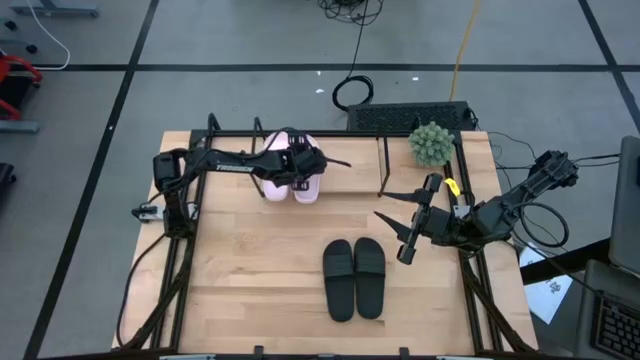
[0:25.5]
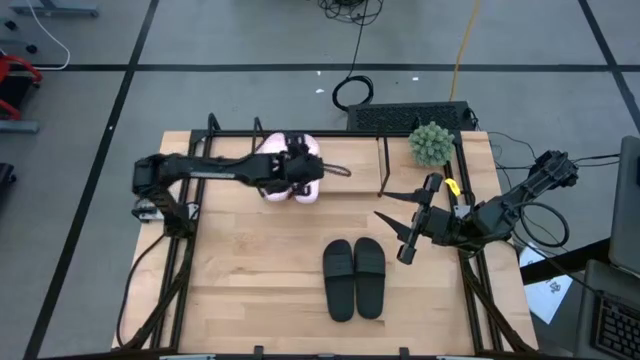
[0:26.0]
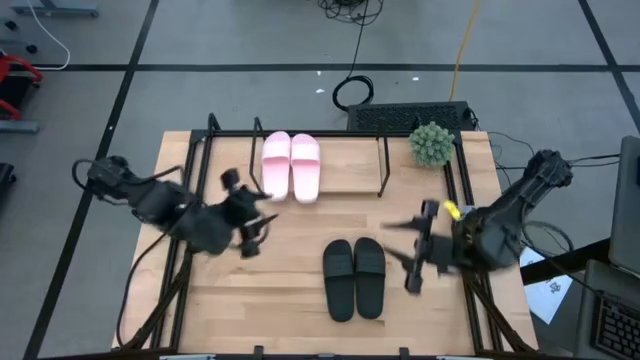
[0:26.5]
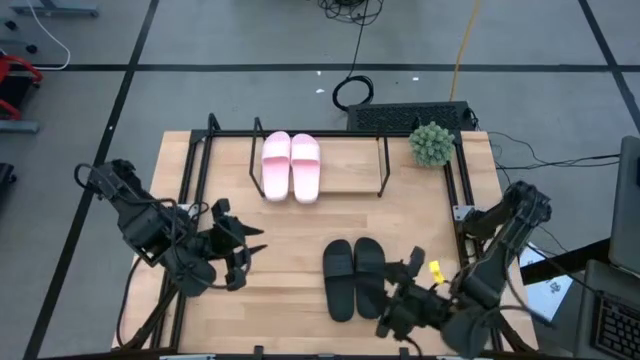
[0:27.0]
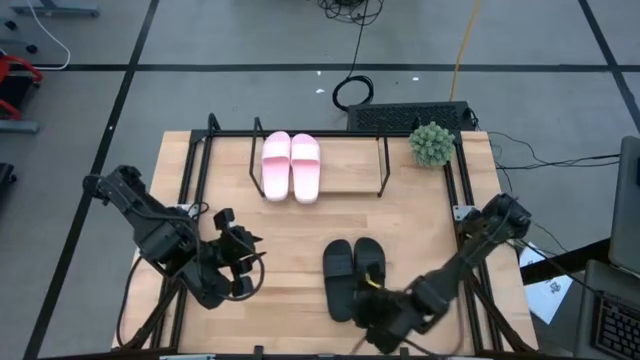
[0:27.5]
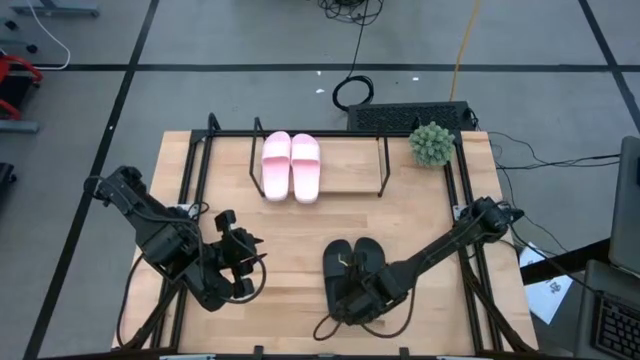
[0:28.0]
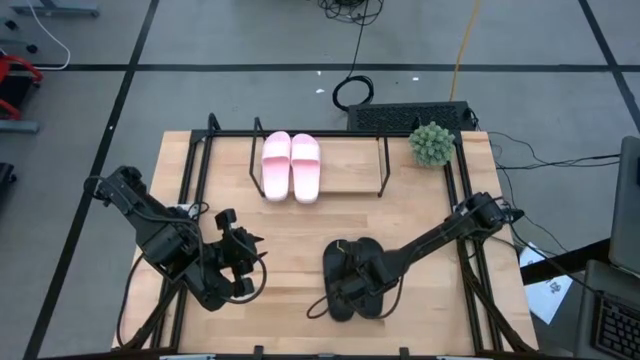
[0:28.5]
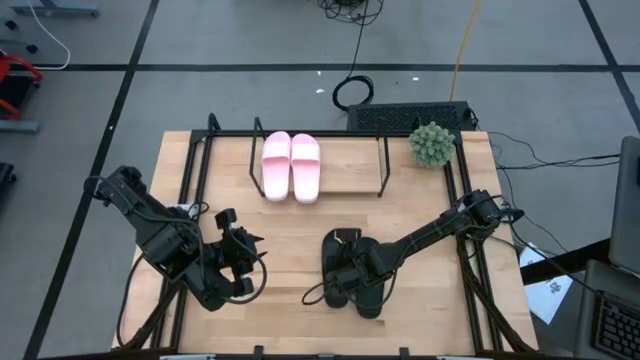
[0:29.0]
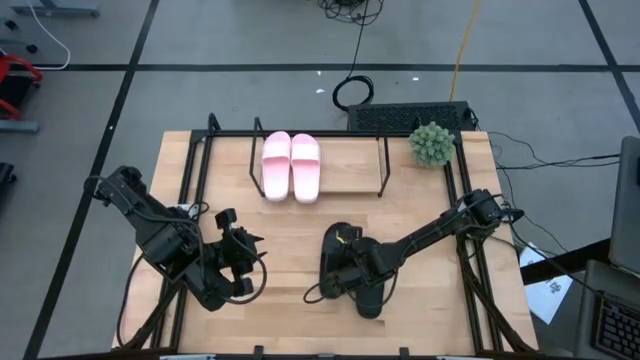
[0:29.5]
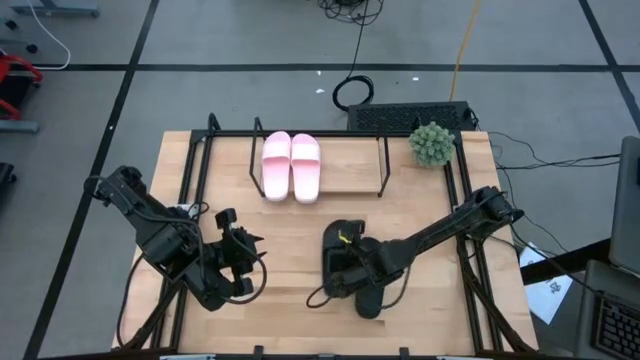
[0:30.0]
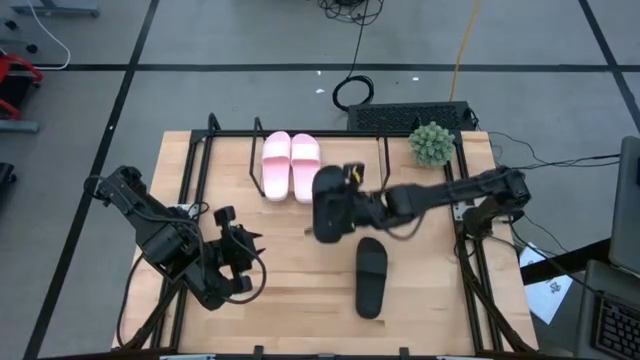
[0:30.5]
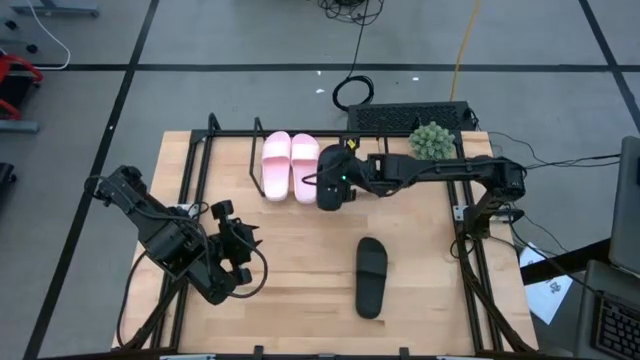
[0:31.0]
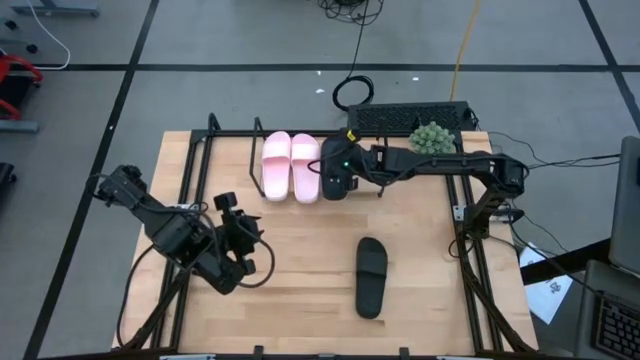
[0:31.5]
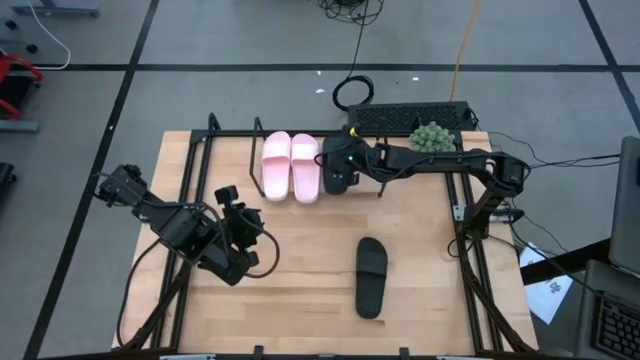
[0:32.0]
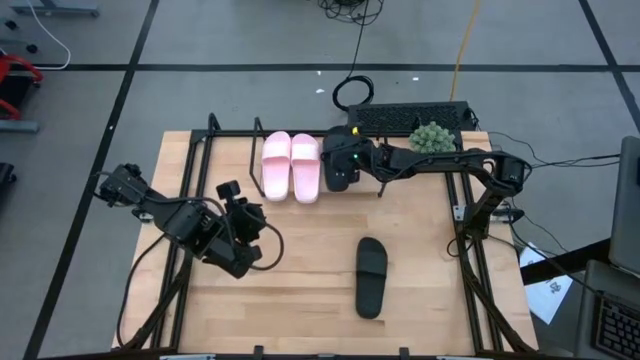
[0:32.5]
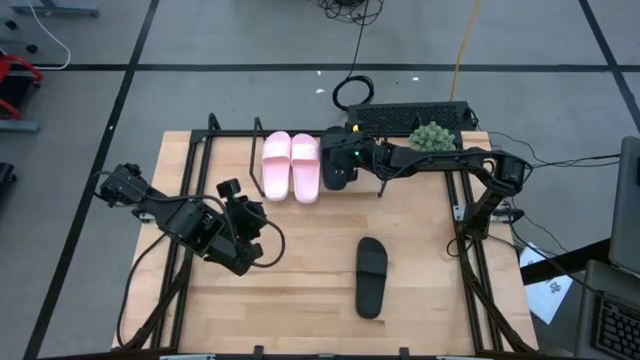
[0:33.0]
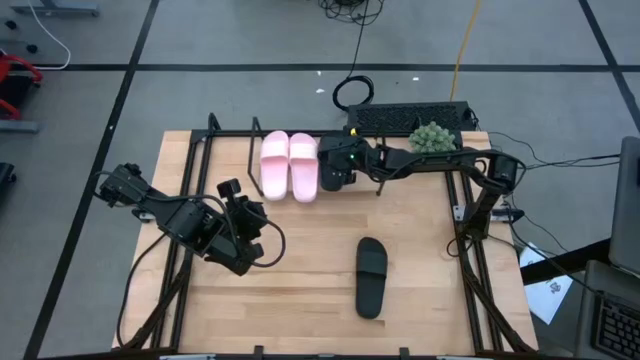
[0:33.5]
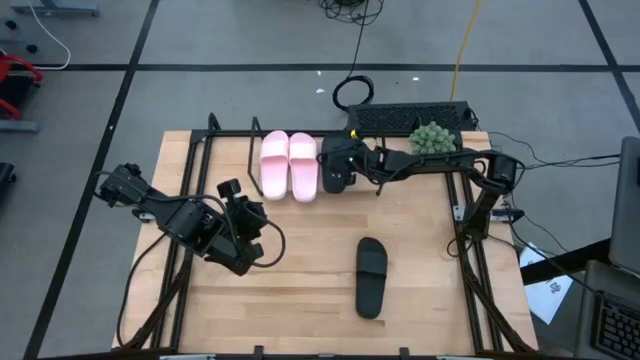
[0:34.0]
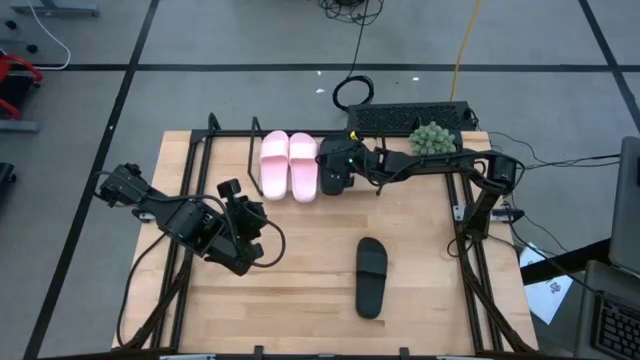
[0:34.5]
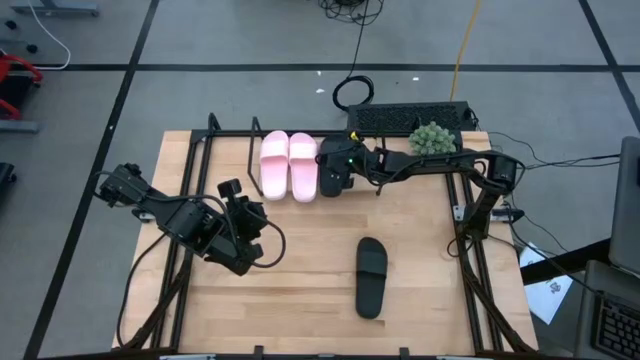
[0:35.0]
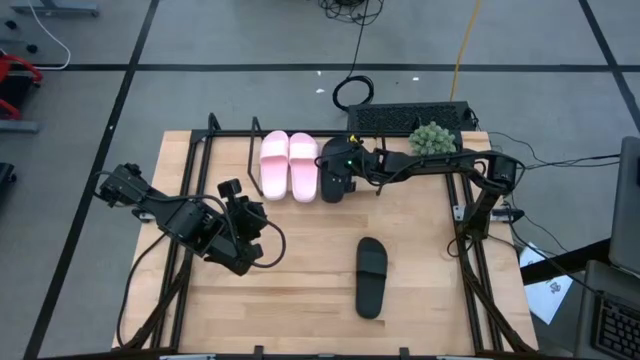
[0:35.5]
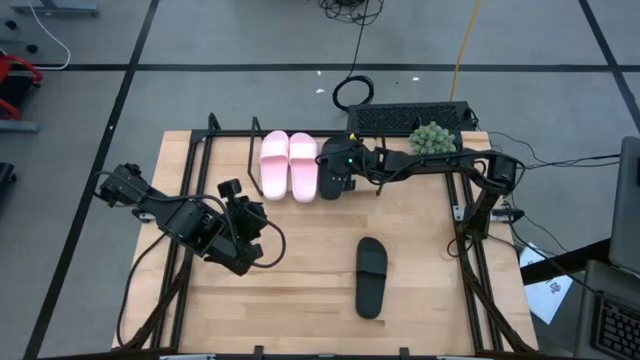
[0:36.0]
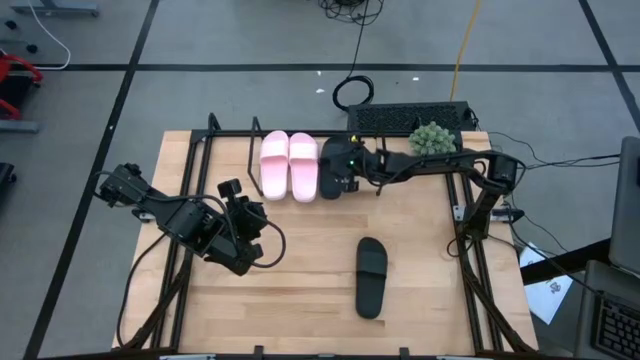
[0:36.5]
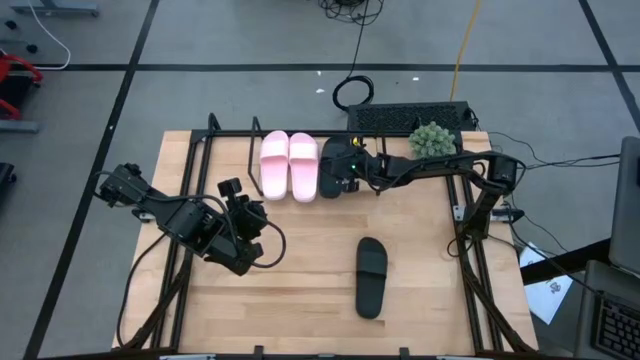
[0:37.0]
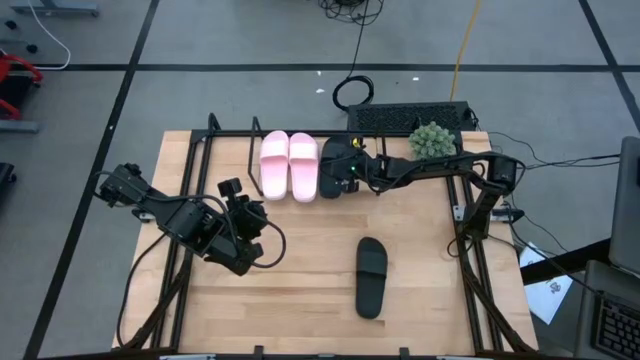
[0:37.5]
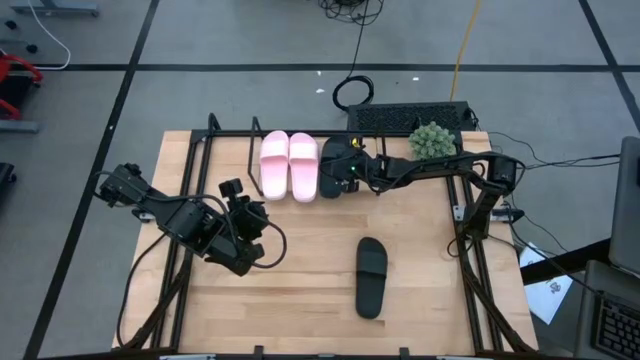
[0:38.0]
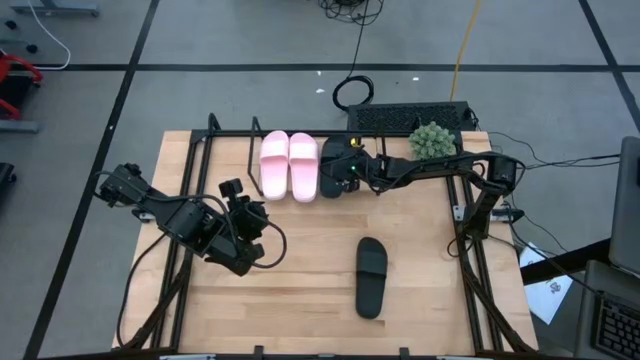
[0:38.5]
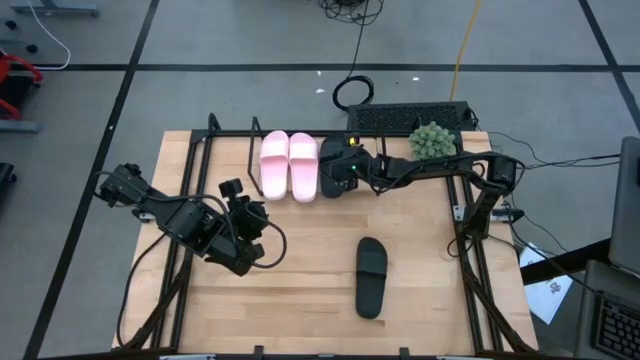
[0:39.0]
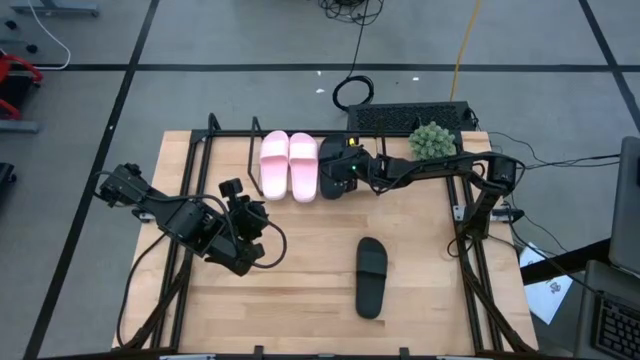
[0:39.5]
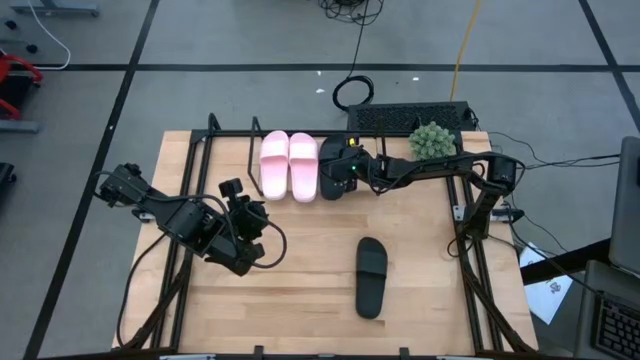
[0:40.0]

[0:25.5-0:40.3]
Task: Pick and place slides into the shelf
Put the left black slipper on the shelf

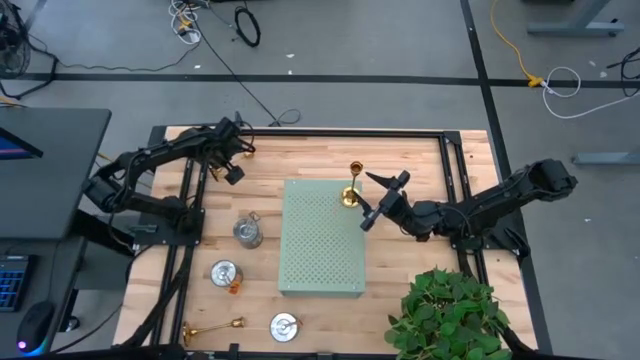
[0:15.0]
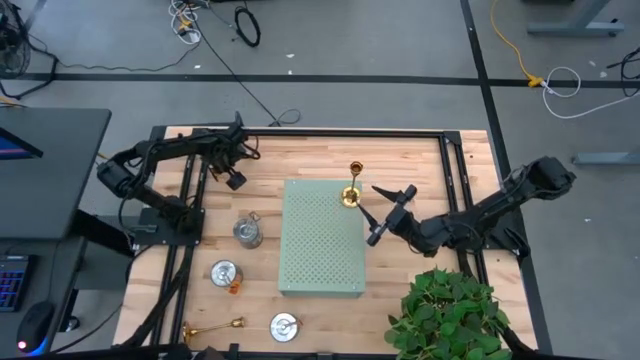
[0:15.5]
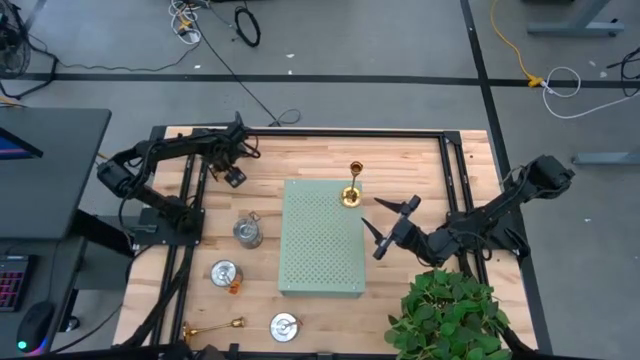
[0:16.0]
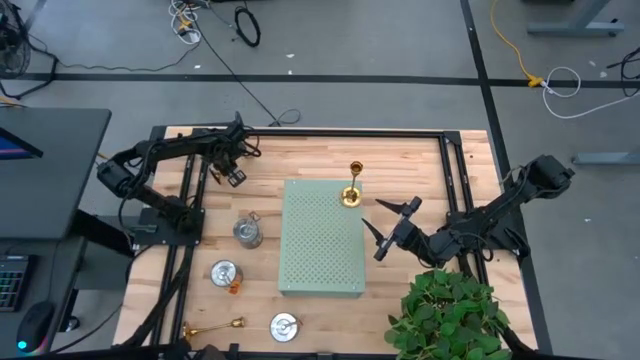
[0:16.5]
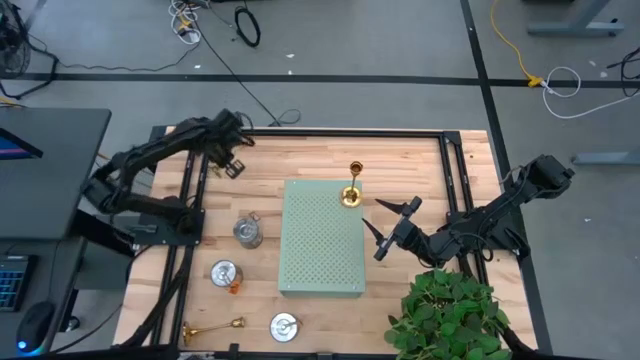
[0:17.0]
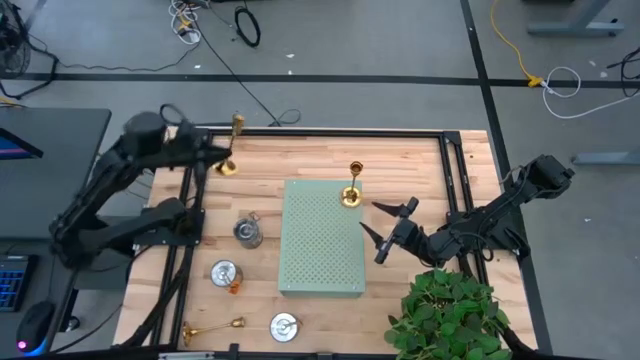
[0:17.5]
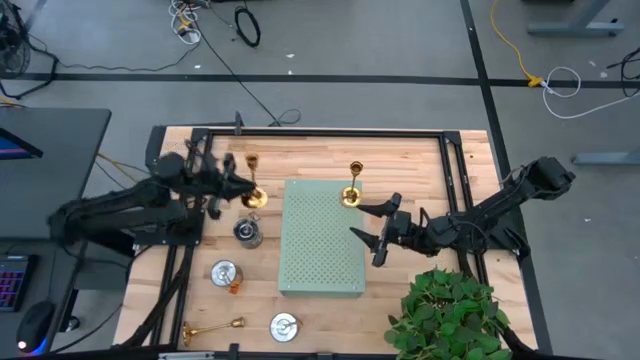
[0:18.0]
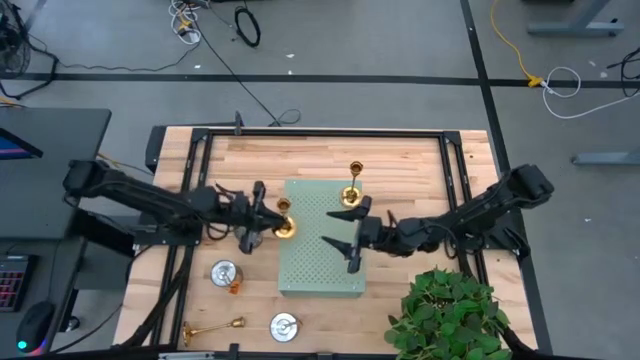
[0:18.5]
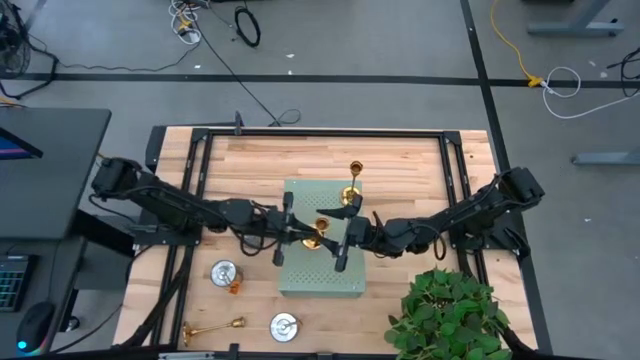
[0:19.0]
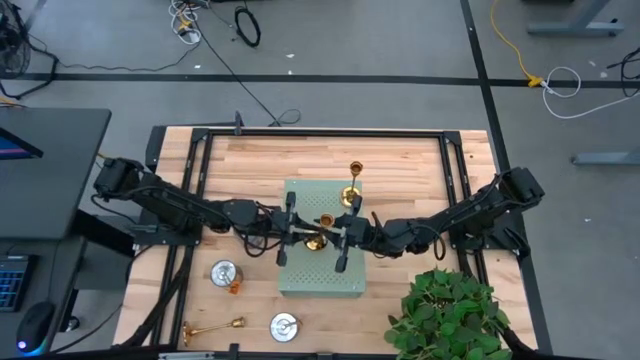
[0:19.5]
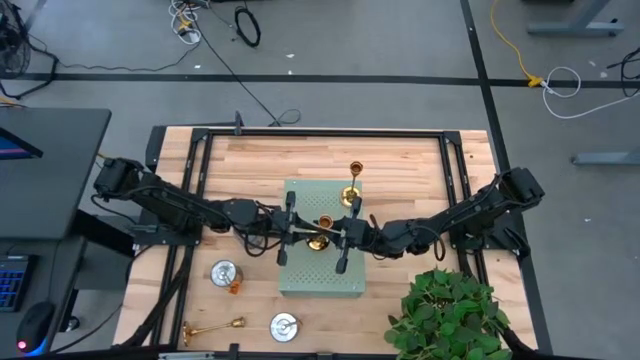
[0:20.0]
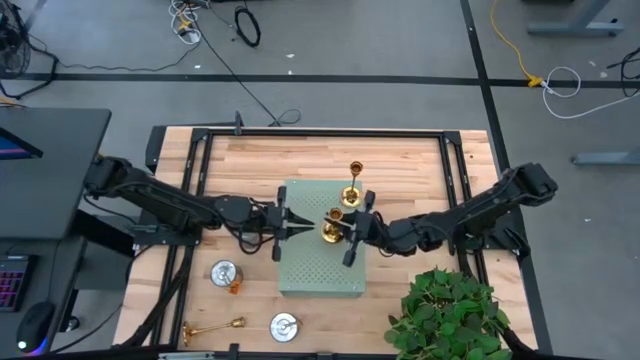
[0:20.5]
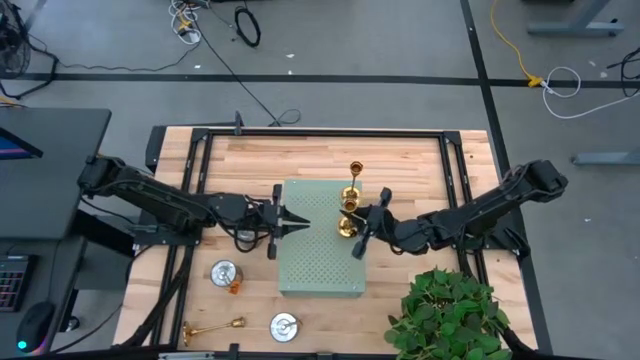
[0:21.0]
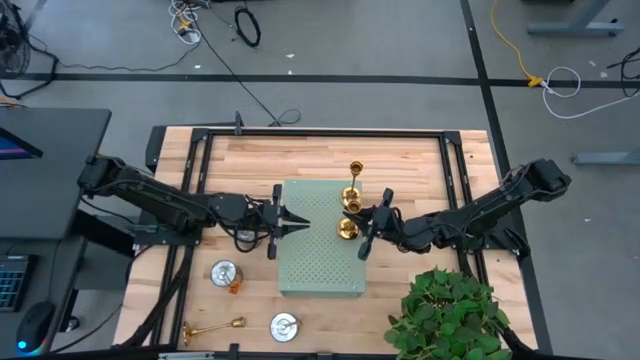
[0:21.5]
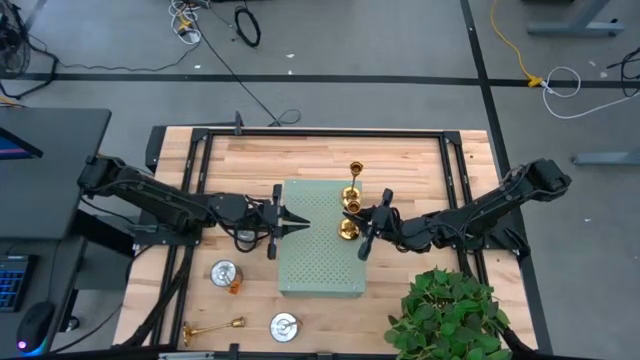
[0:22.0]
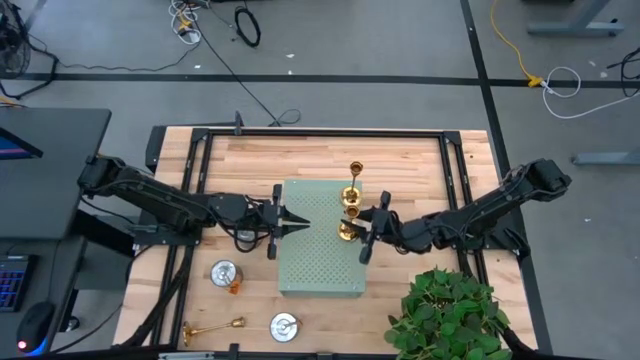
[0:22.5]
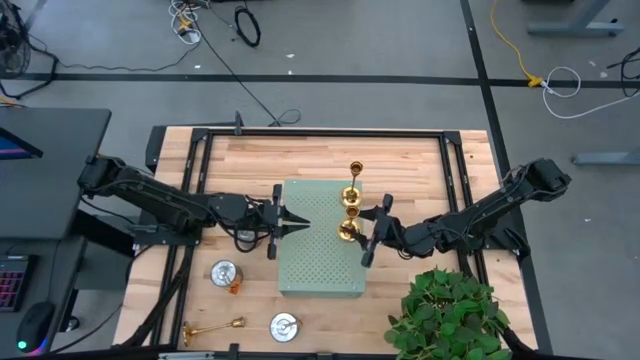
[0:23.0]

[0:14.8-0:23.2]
Task: Pick & Place candle stick holders
Put the top short gold candle holder on the shelf
